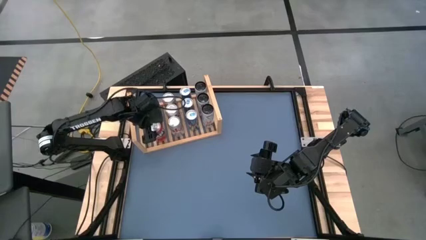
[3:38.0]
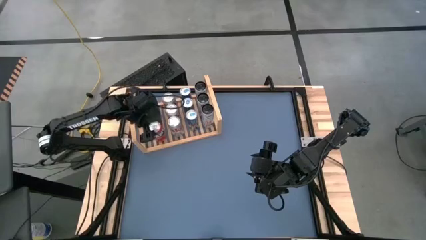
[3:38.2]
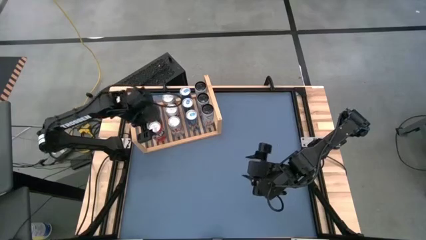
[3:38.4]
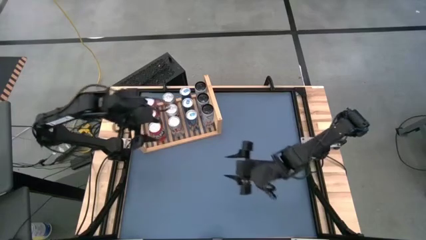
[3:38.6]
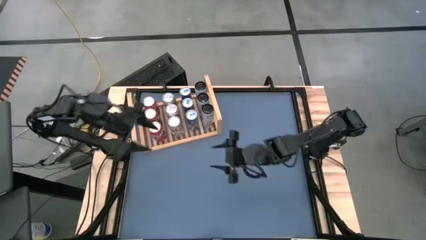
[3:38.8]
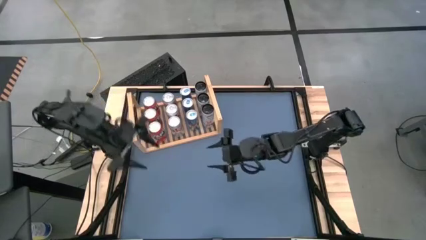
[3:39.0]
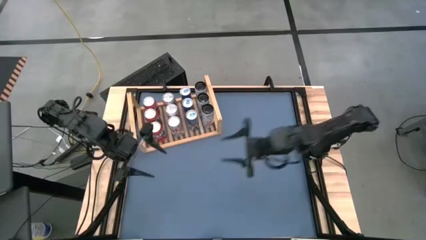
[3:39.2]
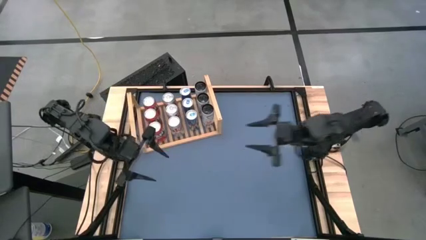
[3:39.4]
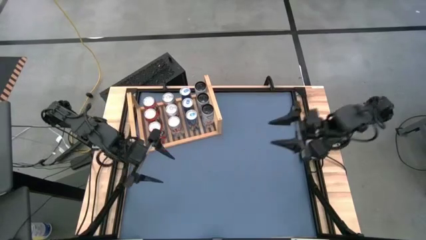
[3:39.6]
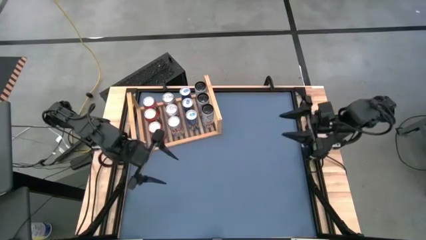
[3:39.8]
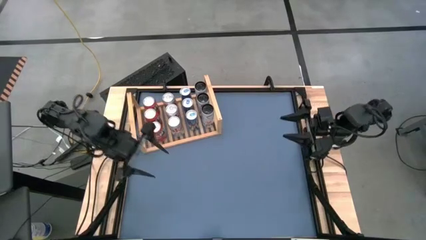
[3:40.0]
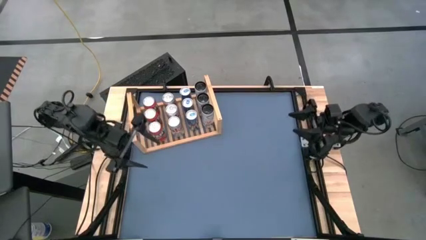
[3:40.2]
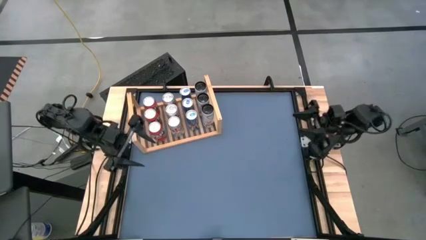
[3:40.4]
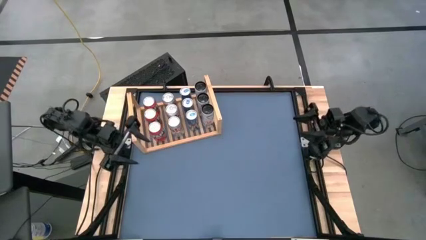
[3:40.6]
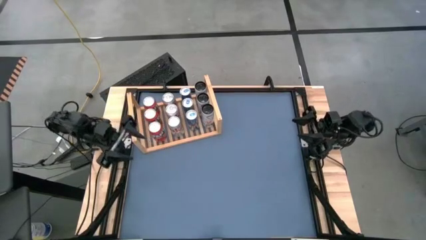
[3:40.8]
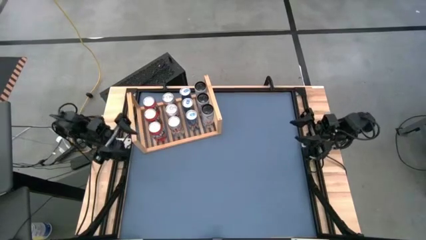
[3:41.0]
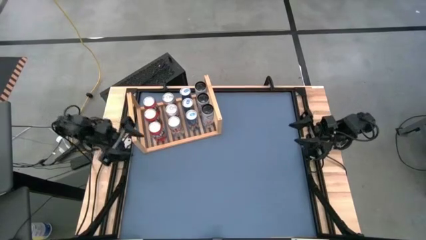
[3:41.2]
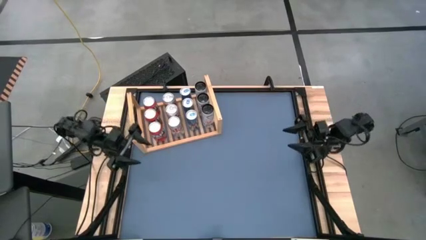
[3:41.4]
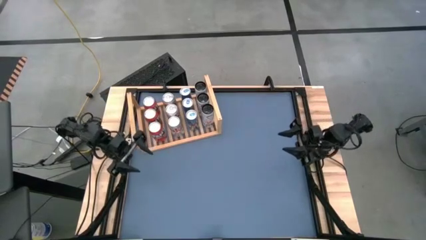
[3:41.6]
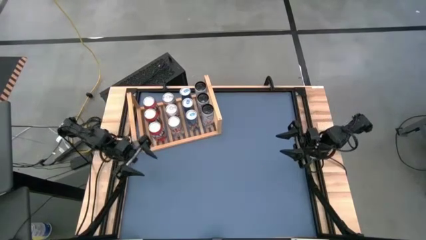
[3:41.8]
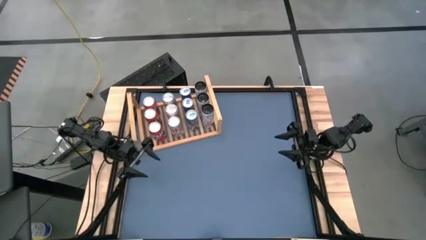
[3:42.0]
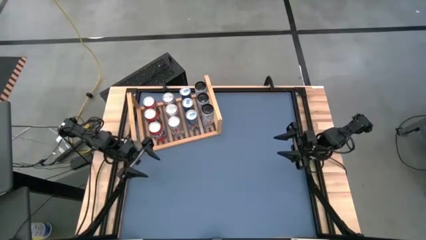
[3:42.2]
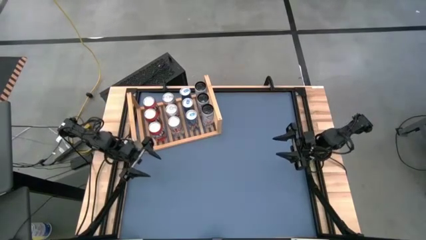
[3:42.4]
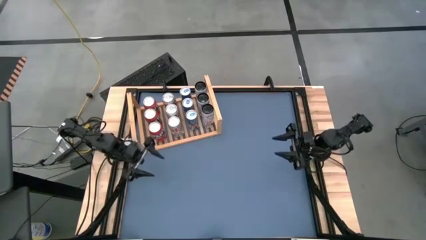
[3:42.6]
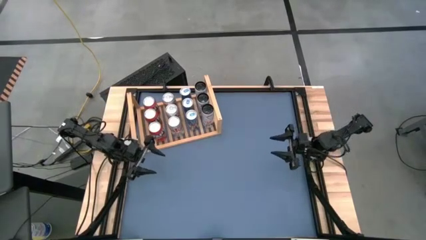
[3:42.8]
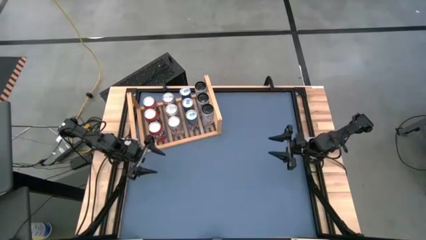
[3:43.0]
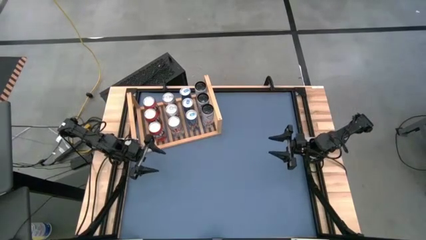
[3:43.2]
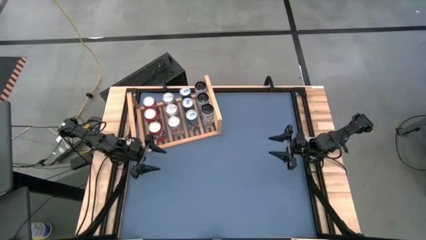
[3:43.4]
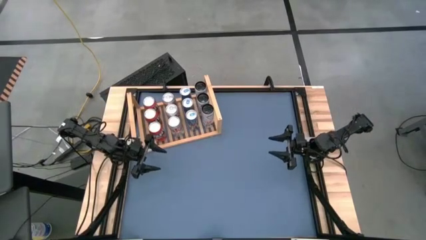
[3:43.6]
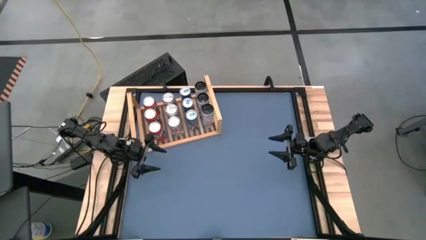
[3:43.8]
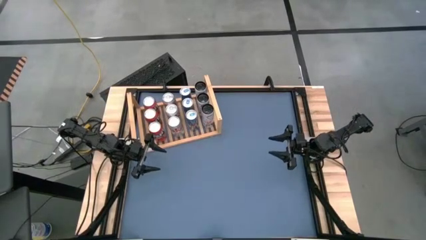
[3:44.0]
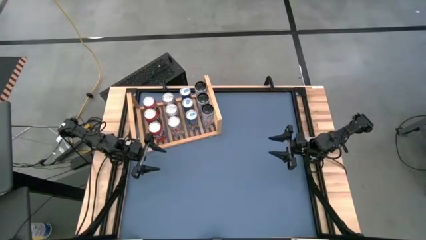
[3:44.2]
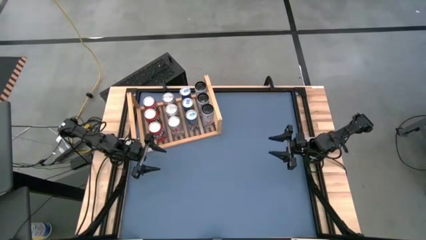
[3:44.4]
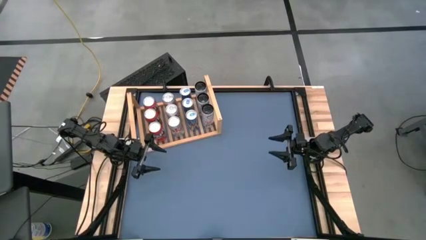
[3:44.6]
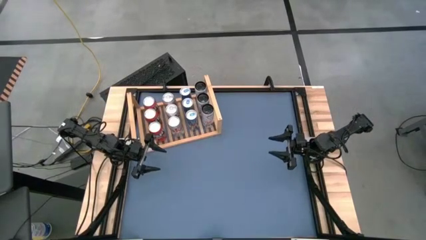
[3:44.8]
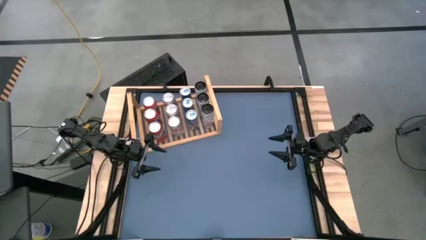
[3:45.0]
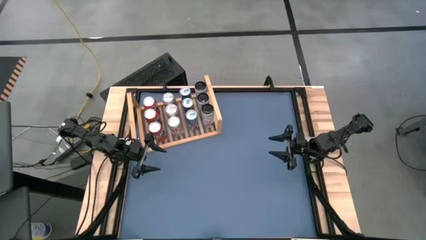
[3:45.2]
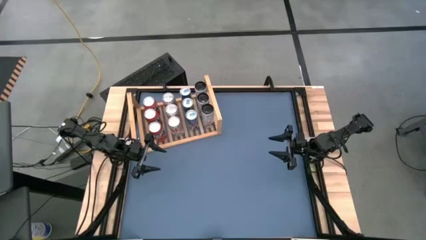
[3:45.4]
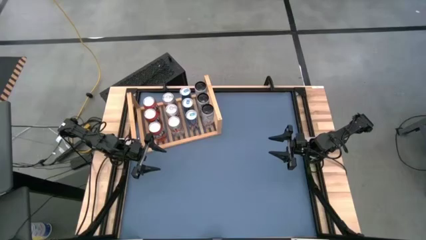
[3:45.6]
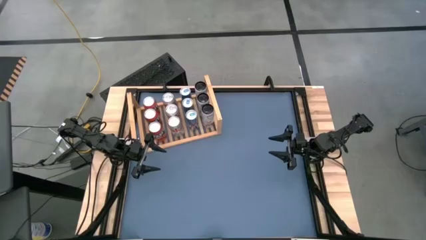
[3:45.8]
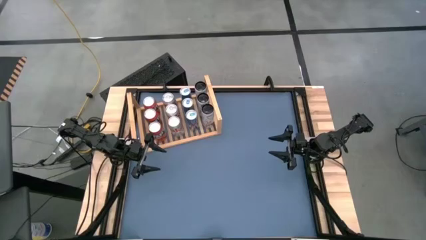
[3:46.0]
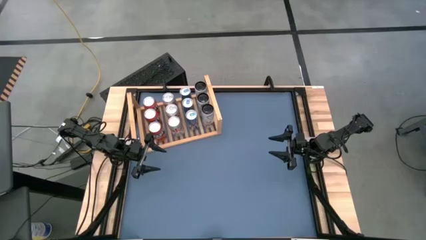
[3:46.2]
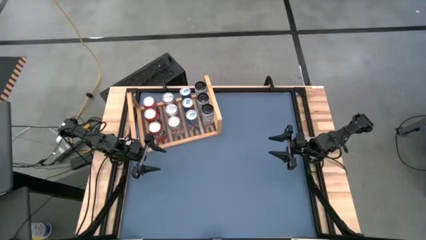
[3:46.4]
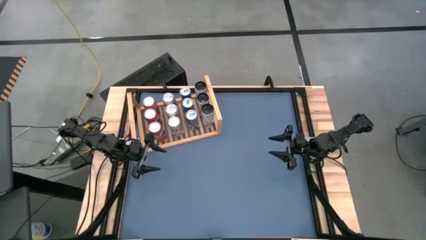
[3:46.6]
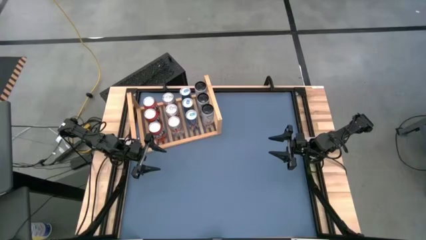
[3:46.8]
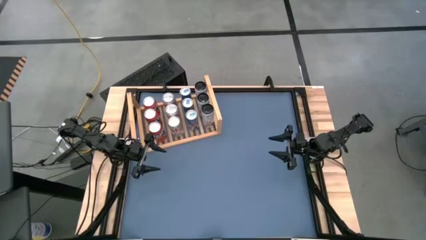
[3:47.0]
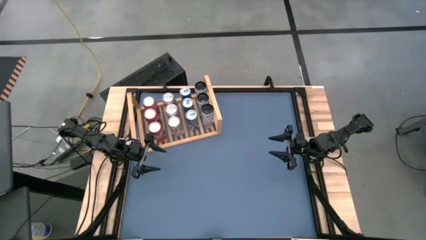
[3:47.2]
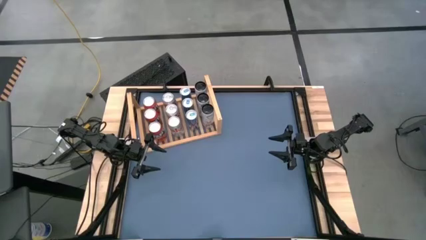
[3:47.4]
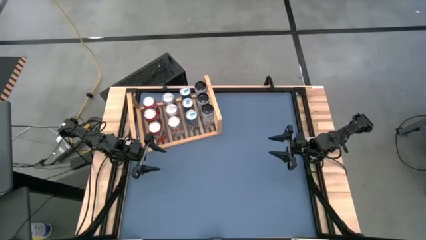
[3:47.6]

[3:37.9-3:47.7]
Task: Place canned beverage on shelf
Return to Home Position

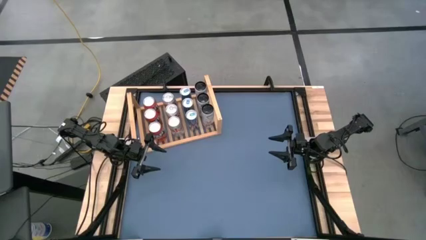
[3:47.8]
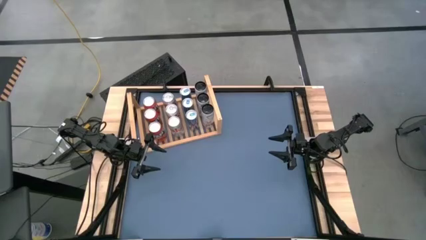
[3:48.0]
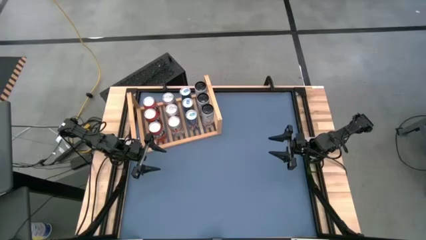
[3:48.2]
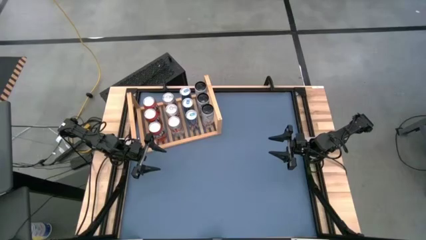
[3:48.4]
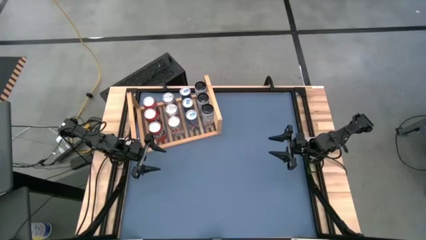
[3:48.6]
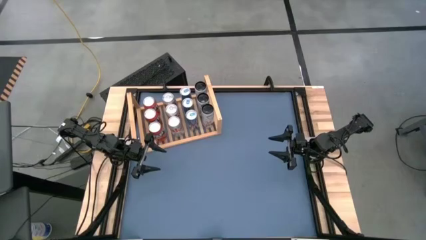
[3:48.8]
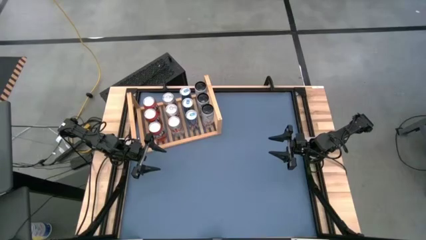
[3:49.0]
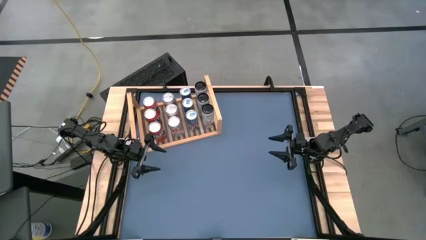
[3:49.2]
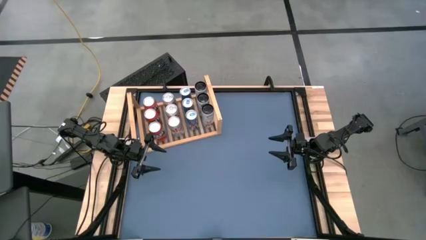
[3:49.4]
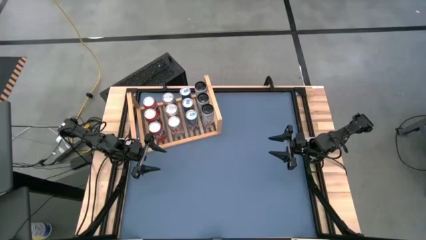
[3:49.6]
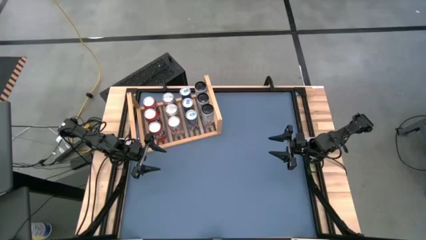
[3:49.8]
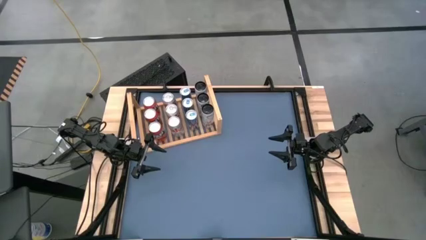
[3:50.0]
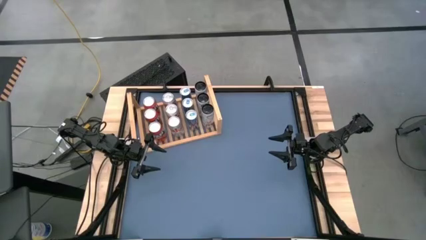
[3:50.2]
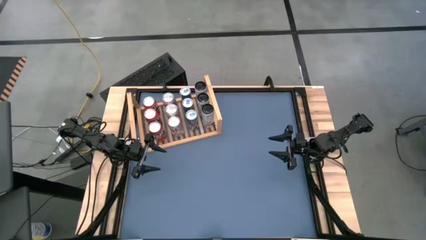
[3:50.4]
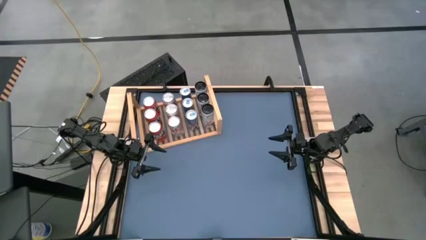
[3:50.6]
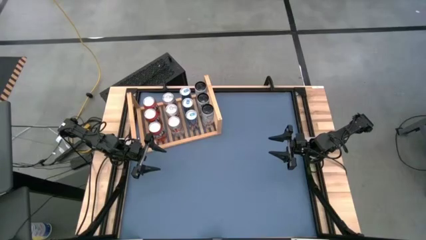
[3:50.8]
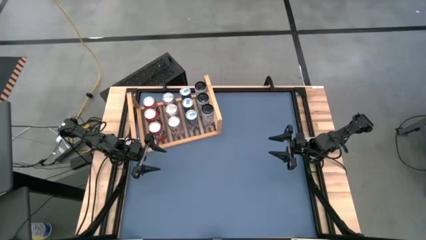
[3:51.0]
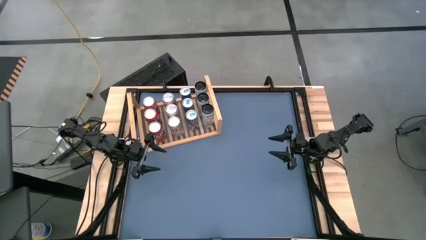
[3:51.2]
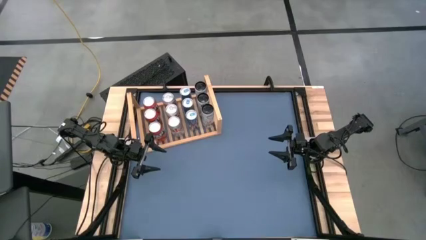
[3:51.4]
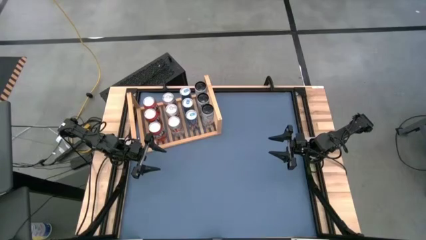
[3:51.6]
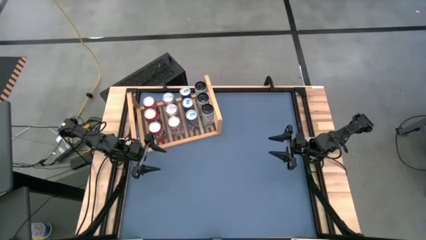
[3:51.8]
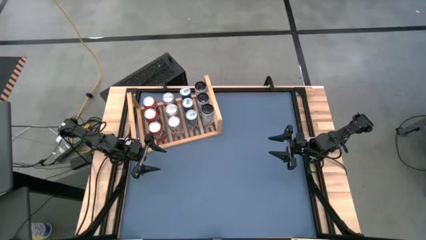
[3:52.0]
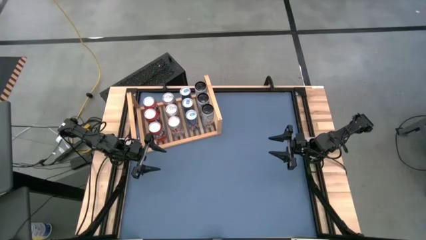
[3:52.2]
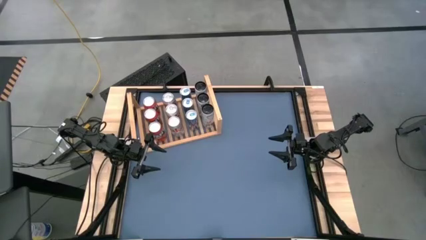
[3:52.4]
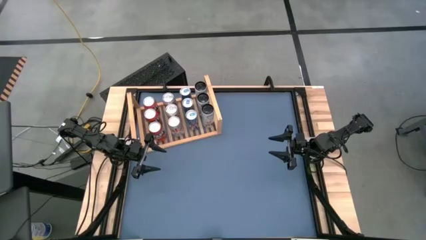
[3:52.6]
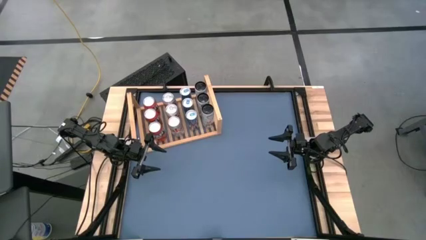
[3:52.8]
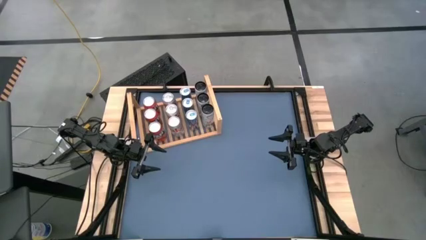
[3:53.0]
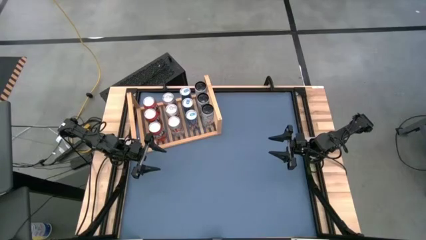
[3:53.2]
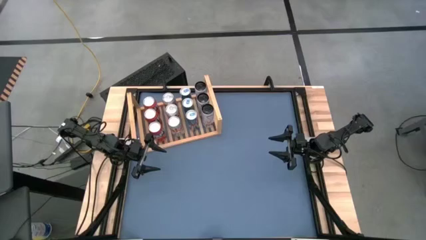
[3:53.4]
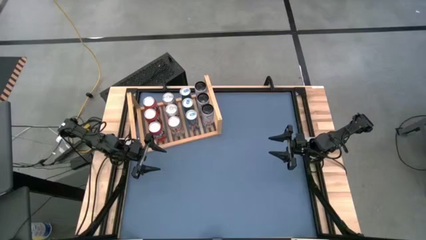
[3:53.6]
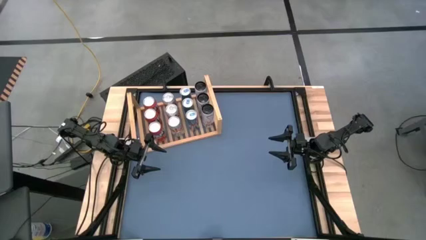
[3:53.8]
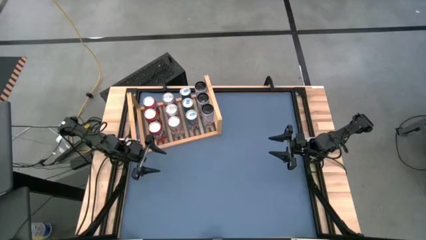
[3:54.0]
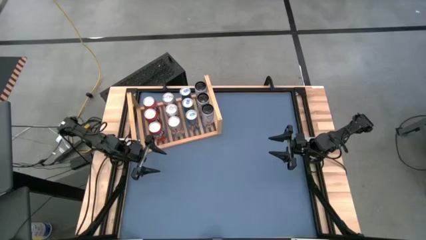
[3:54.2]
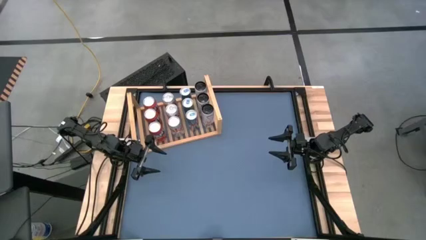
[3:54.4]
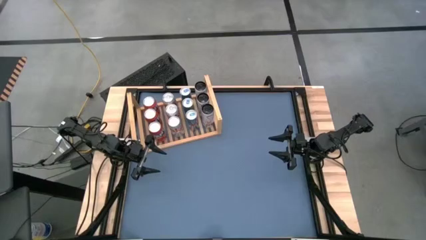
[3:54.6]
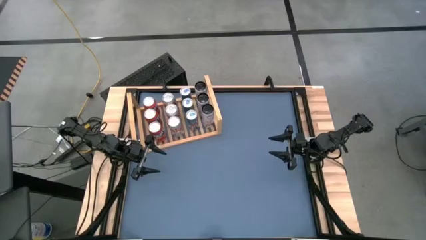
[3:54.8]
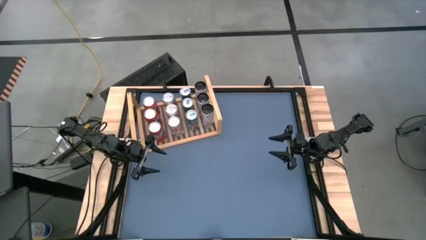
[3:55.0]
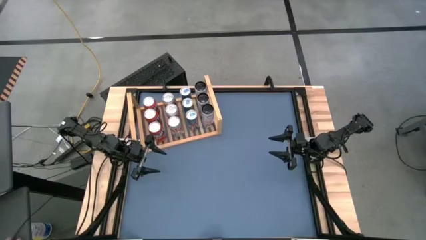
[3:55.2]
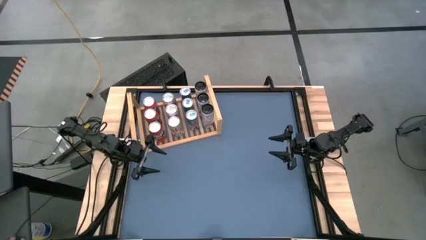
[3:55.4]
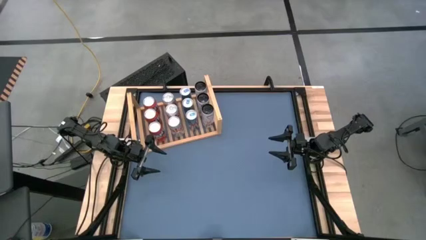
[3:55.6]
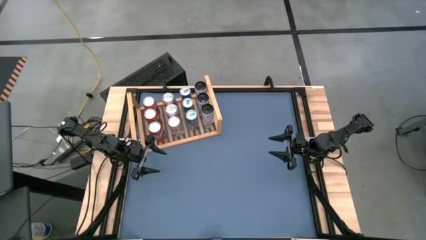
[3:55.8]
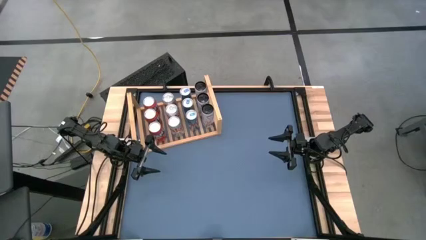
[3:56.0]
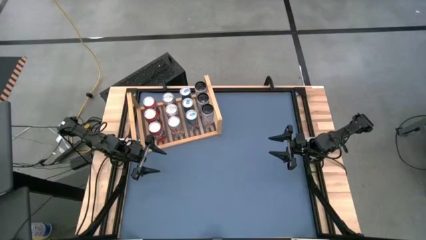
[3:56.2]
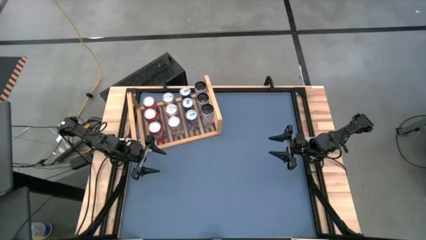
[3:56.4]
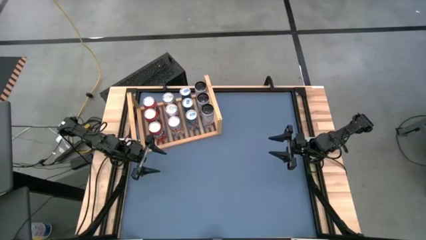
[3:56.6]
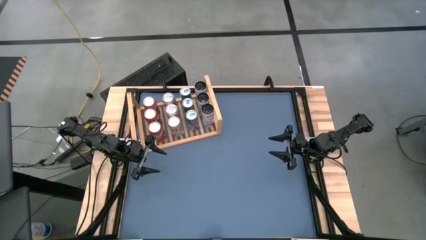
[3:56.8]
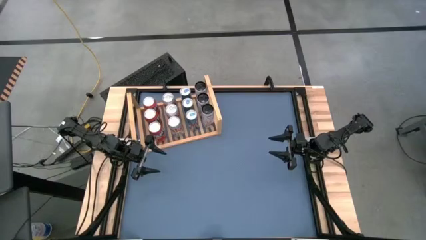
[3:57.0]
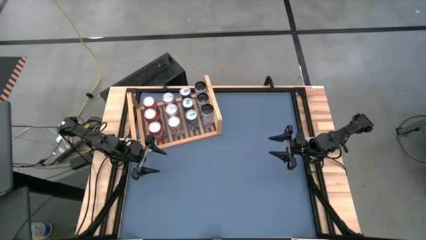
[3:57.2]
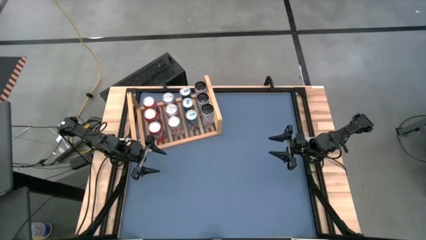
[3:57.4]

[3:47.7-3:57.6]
Return to Home Position
